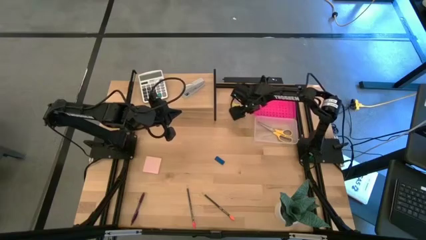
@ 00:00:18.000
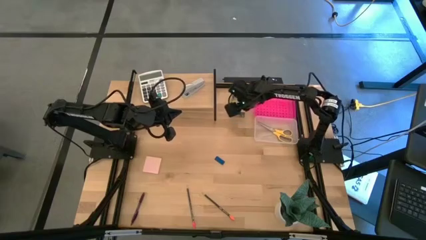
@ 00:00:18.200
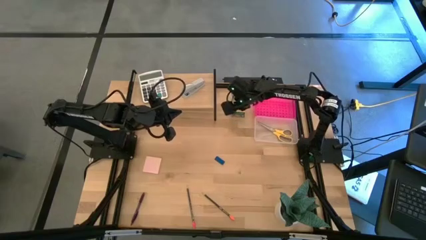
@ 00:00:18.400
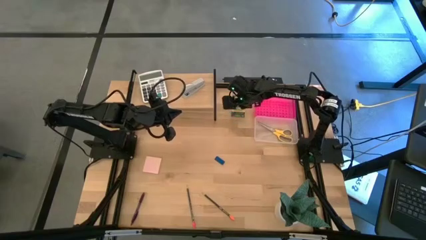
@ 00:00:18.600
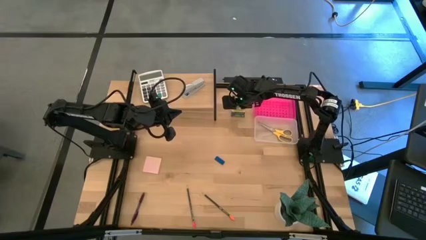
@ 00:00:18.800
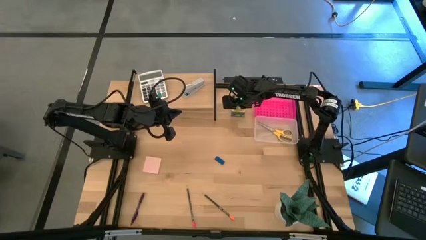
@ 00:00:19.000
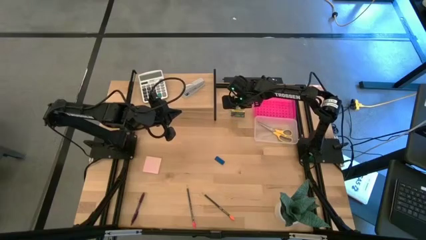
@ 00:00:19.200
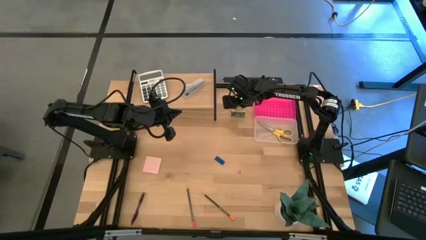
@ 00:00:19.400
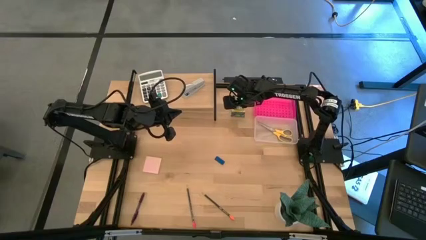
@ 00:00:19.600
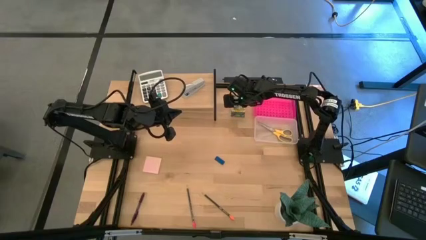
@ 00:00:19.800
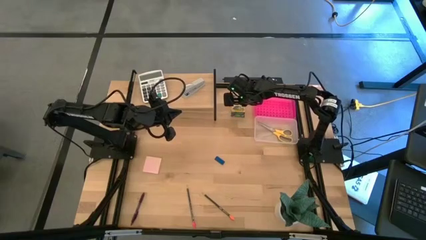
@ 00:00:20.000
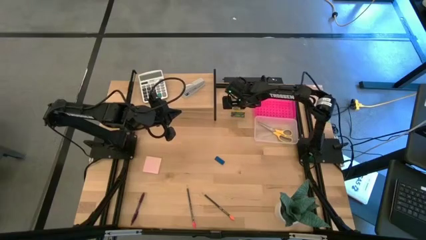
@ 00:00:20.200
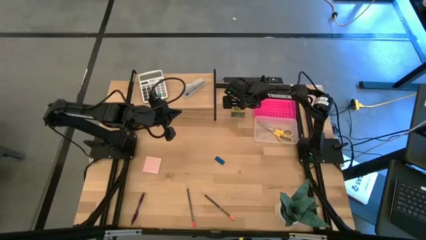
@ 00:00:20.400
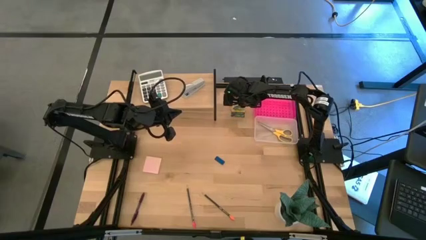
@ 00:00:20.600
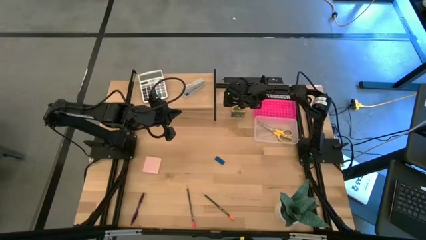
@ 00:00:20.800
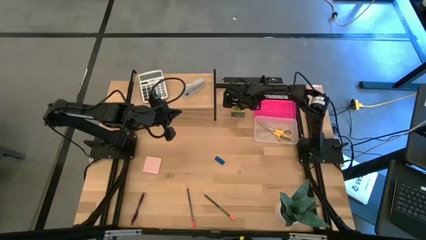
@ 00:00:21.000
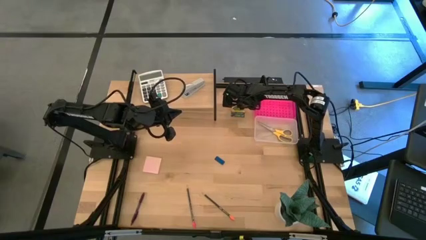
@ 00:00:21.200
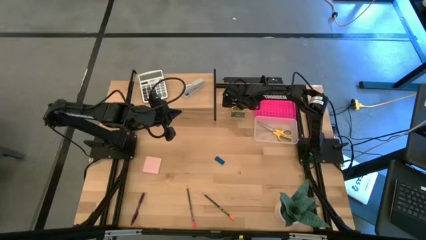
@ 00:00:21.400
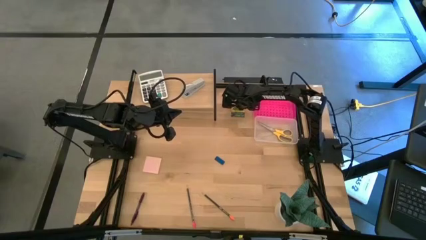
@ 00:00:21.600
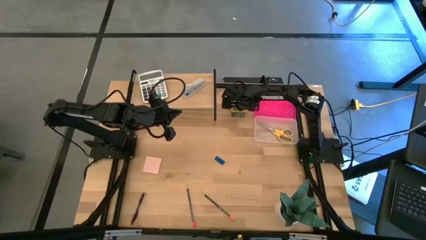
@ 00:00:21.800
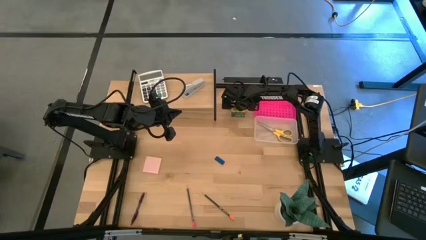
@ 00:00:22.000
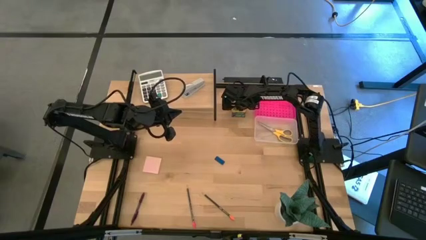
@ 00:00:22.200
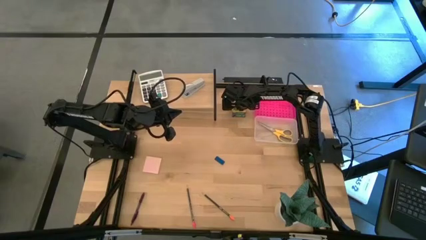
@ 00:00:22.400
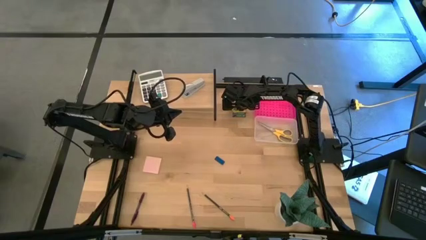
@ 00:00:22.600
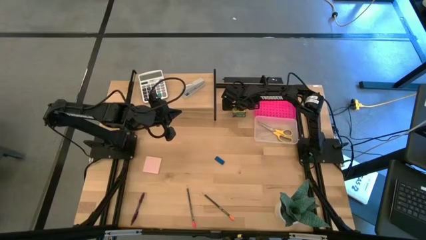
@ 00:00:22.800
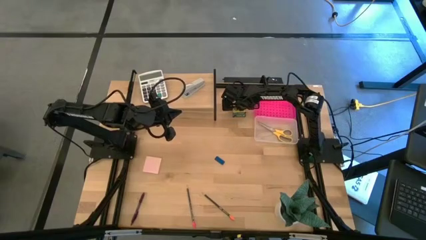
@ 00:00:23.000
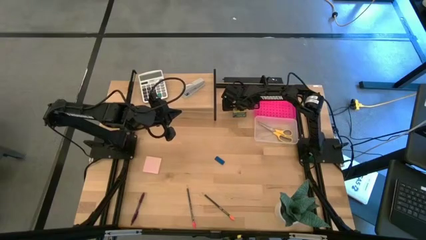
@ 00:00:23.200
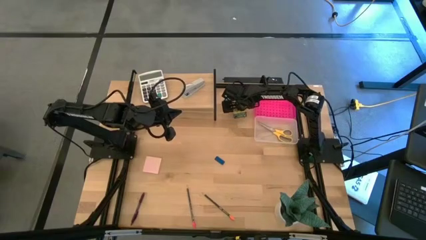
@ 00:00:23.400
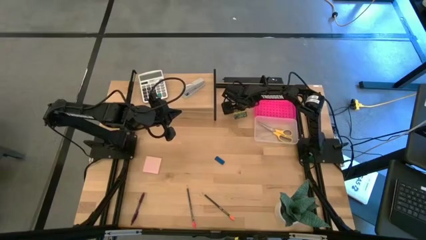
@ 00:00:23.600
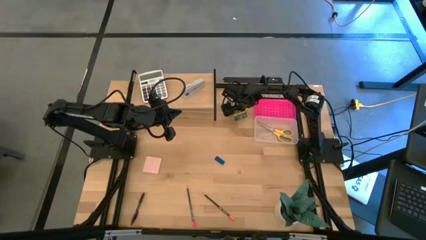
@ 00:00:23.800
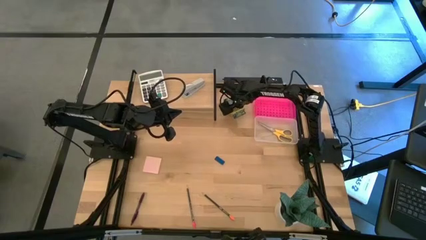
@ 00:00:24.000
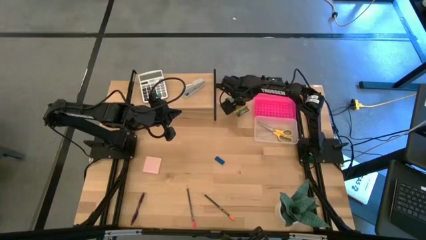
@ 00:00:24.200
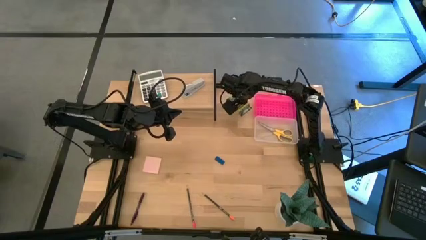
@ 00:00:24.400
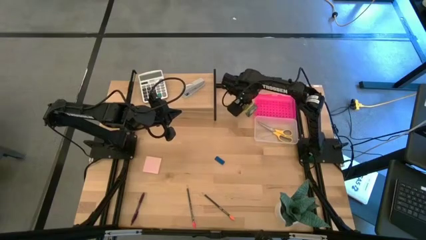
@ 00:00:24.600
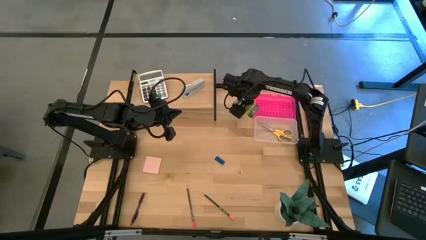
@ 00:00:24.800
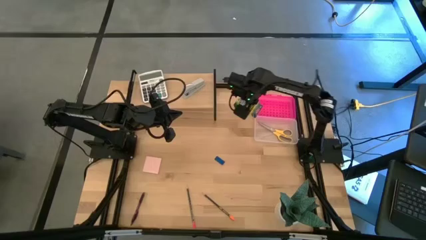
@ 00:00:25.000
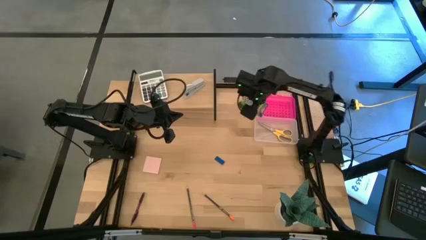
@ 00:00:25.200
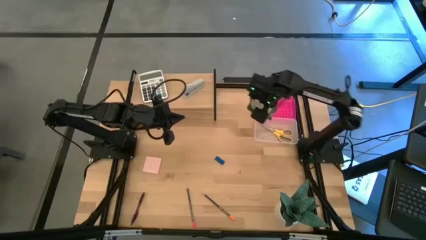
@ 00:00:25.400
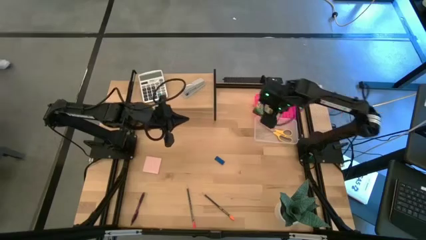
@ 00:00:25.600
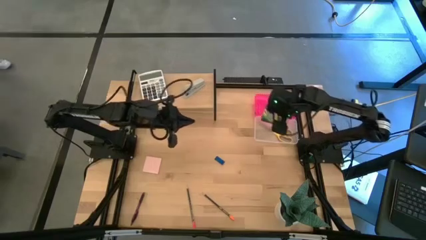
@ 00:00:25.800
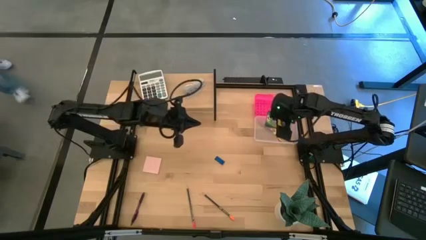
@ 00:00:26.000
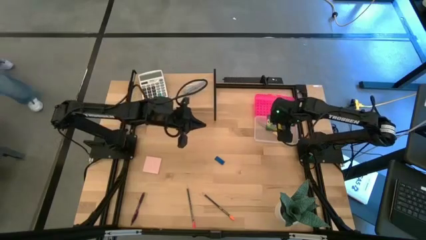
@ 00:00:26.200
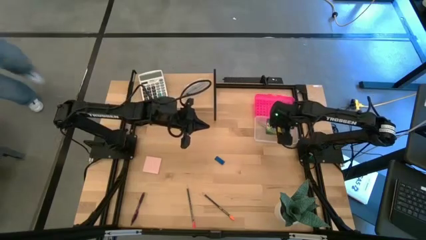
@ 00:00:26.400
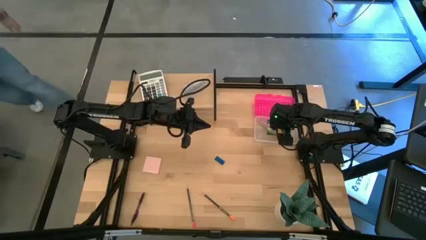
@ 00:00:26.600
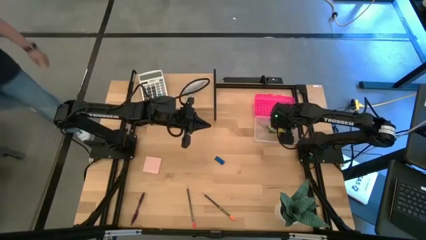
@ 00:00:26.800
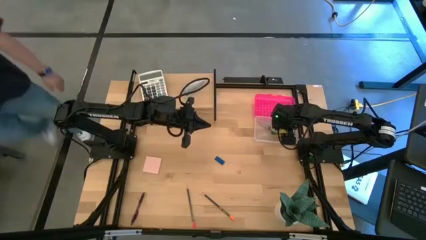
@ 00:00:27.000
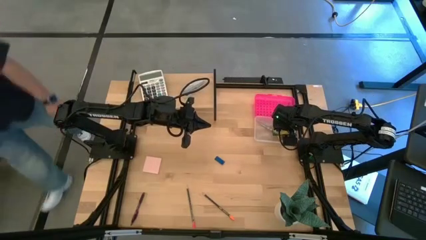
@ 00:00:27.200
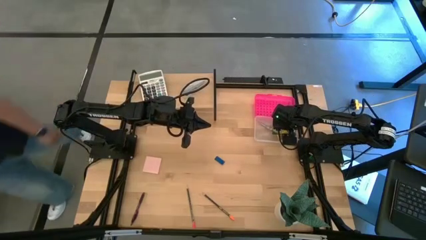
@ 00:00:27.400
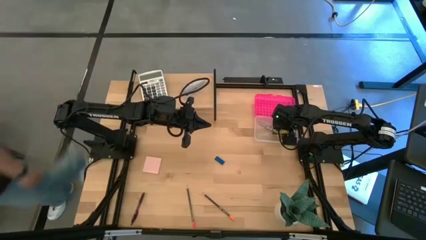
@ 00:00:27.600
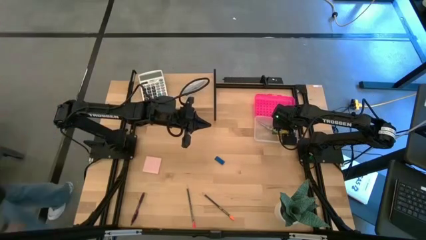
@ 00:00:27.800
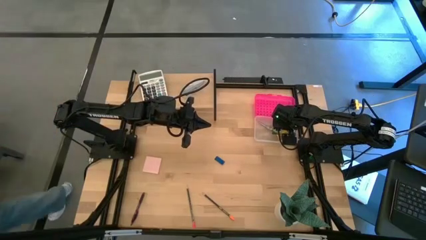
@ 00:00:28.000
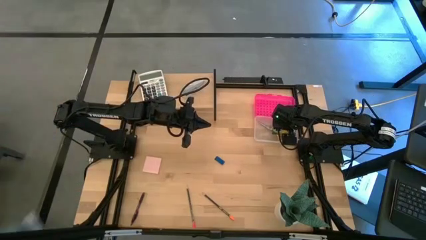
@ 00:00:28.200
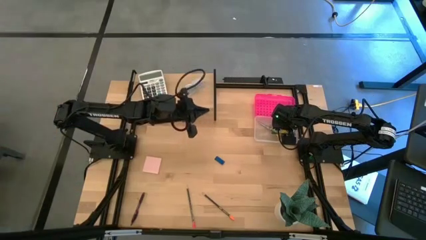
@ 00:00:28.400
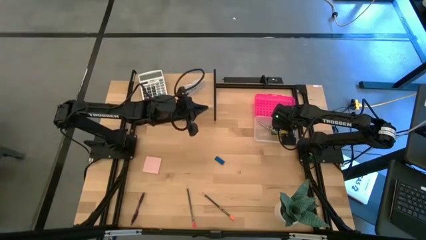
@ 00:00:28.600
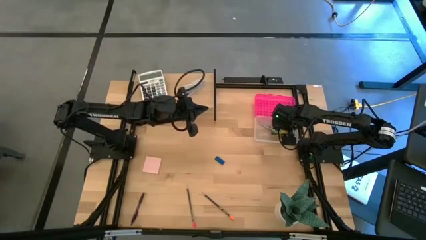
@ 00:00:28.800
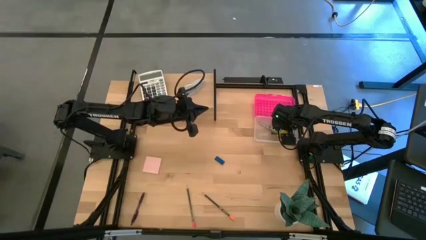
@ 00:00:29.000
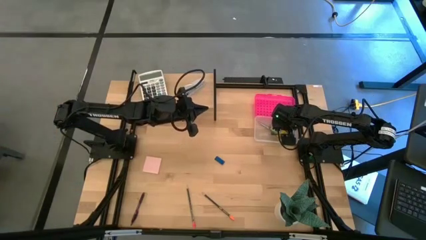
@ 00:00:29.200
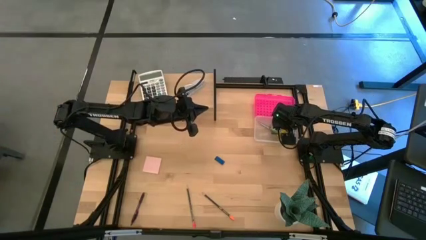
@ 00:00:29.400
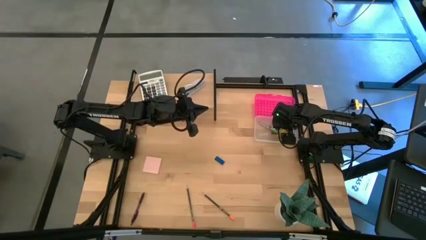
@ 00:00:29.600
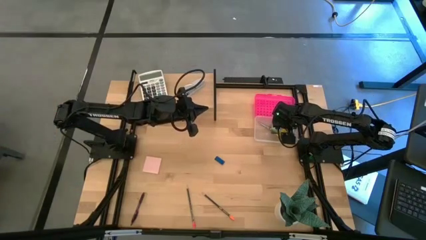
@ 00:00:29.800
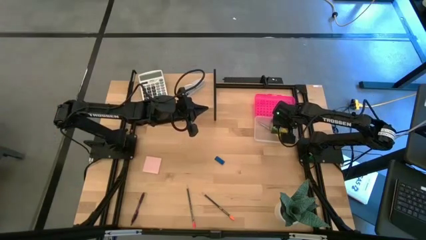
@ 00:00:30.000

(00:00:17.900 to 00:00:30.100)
Task: Pack school essentials
Put the yellow crayon box into the pink supply box

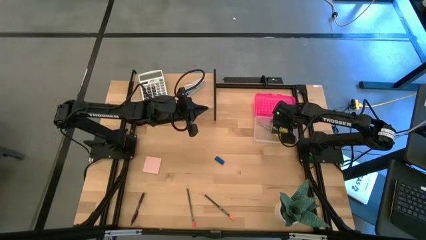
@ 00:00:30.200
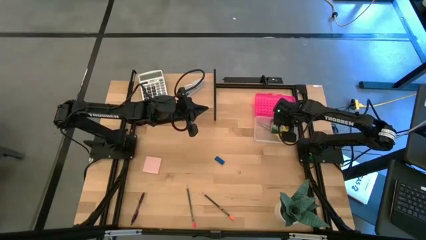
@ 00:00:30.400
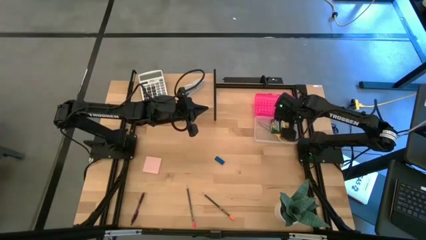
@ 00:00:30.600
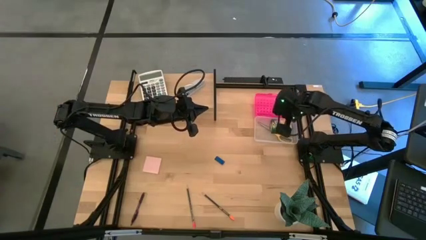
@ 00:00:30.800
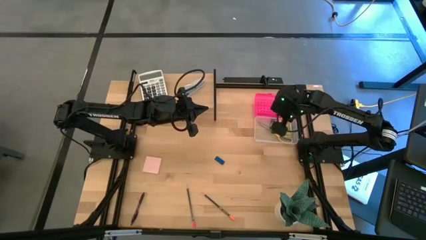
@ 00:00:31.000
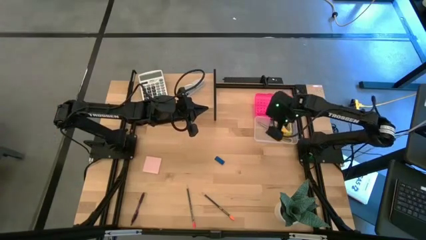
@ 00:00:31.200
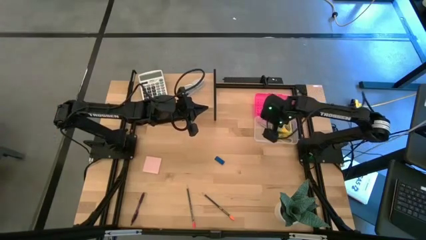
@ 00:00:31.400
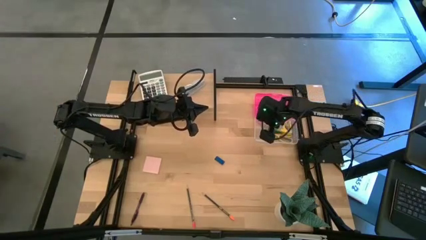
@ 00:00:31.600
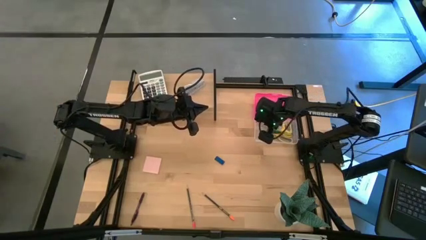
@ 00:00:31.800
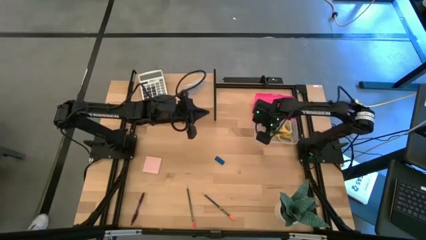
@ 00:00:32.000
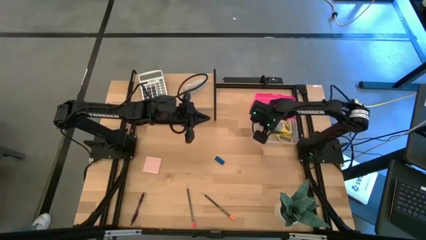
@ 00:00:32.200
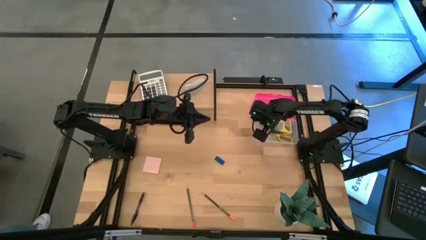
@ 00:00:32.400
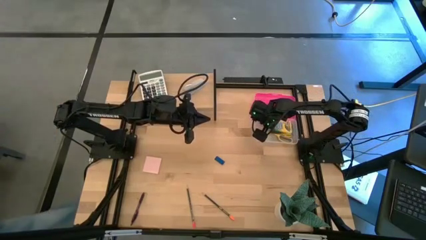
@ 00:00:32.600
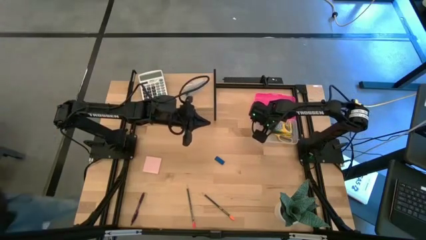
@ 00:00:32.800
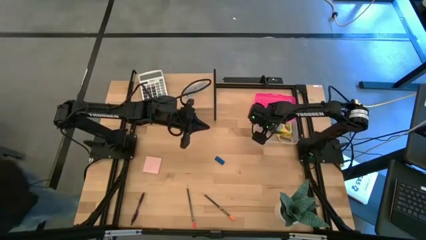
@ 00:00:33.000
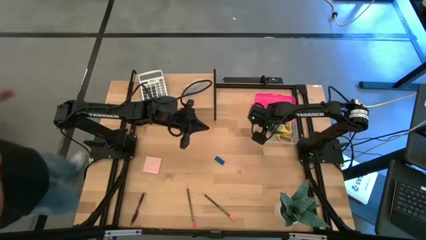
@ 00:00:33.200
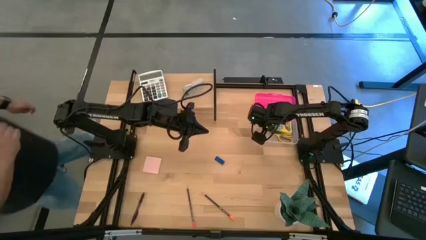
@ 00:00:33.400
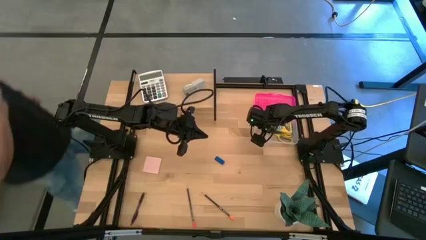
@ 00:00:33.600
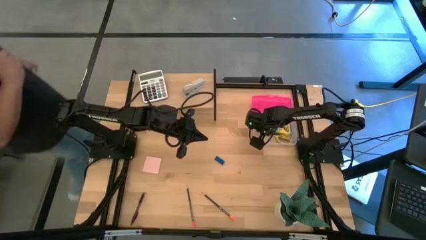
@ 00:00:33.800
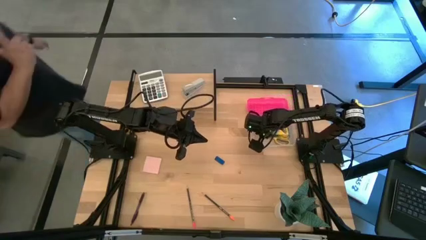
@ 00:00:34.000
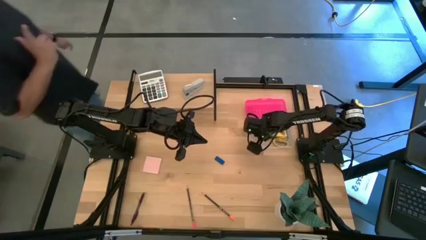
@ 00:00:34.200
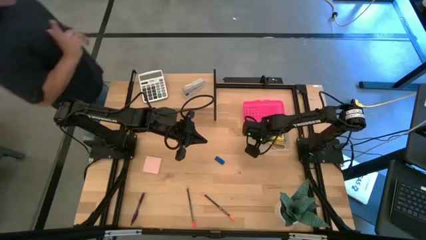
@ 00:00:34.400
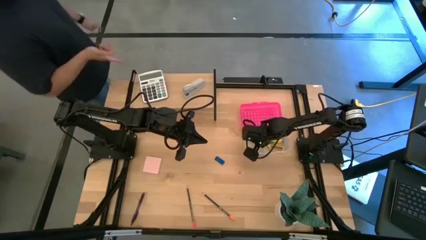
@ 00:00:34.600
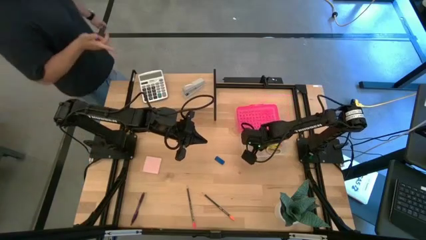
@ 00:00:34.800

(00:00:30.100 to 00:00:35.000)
Adjust the pink supply box
